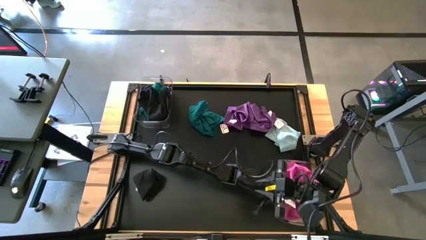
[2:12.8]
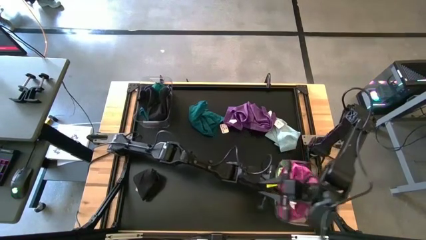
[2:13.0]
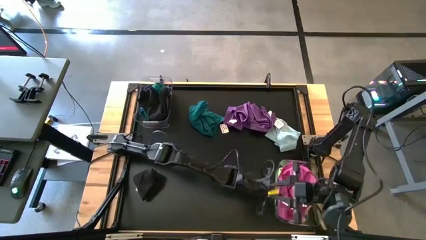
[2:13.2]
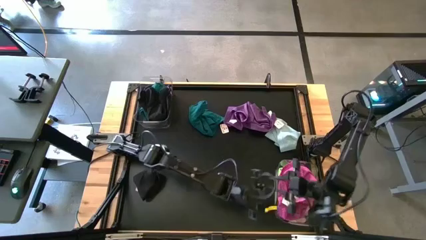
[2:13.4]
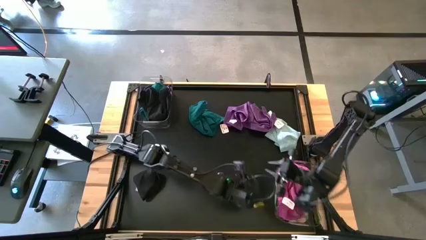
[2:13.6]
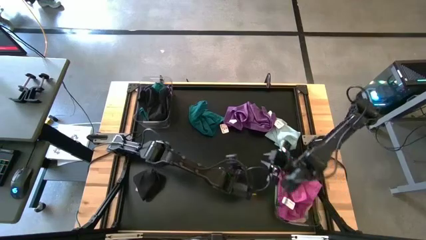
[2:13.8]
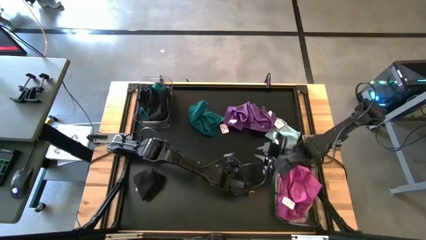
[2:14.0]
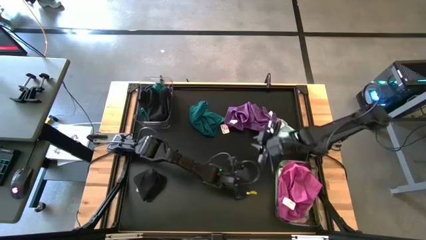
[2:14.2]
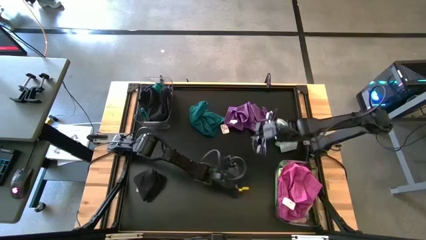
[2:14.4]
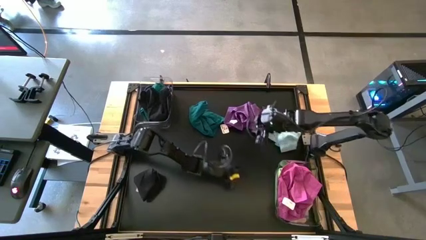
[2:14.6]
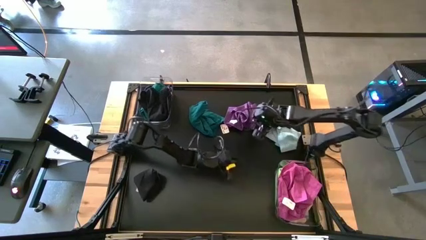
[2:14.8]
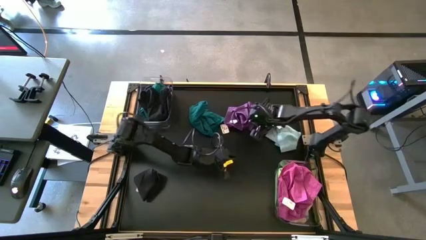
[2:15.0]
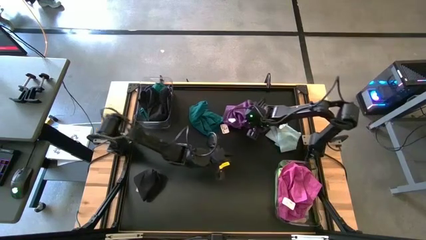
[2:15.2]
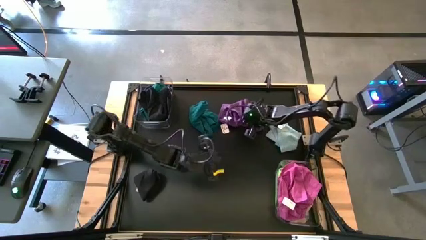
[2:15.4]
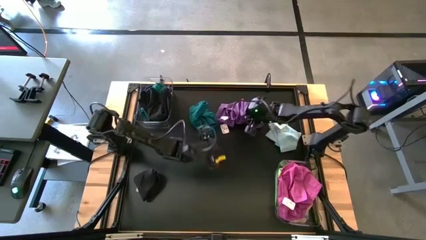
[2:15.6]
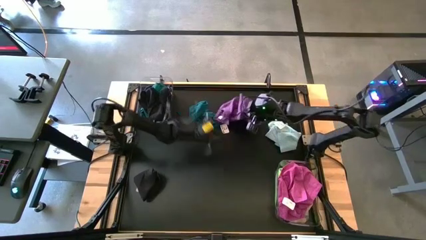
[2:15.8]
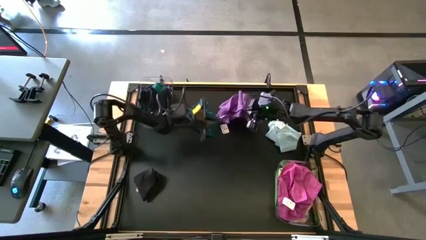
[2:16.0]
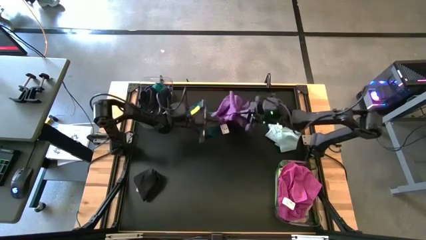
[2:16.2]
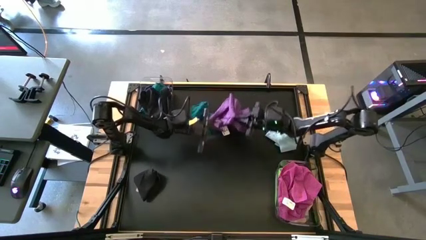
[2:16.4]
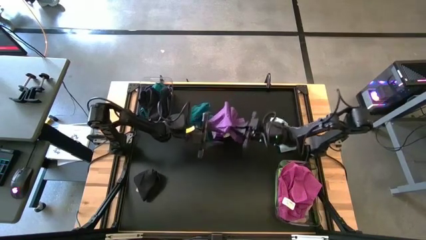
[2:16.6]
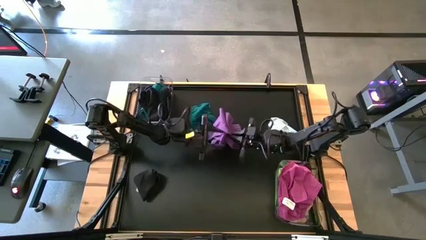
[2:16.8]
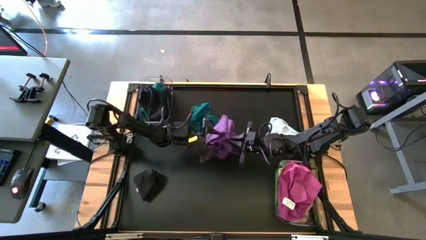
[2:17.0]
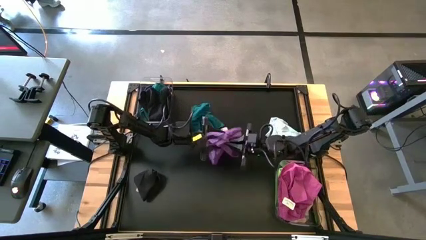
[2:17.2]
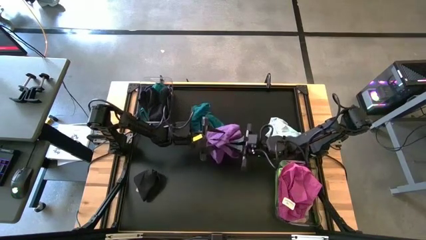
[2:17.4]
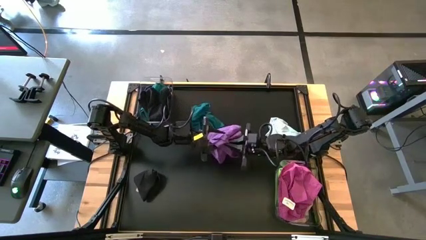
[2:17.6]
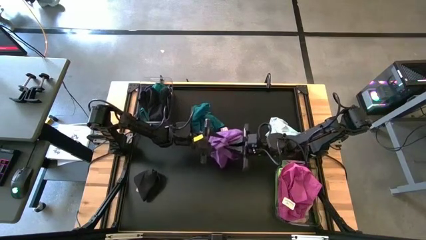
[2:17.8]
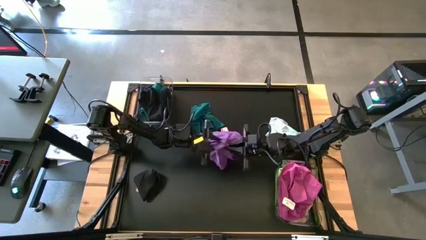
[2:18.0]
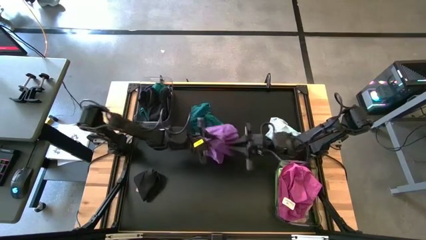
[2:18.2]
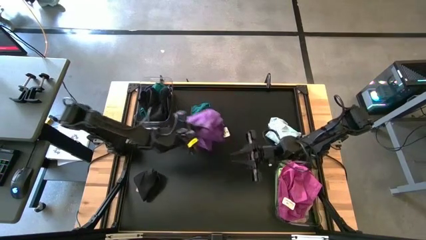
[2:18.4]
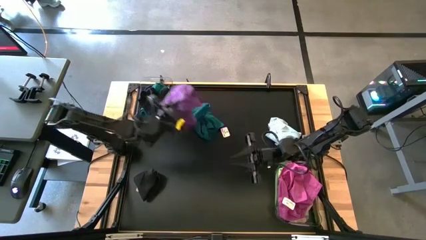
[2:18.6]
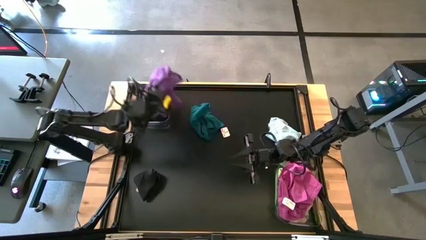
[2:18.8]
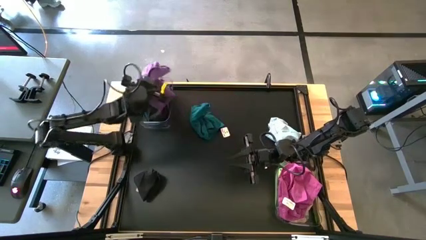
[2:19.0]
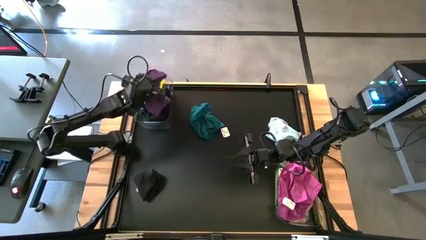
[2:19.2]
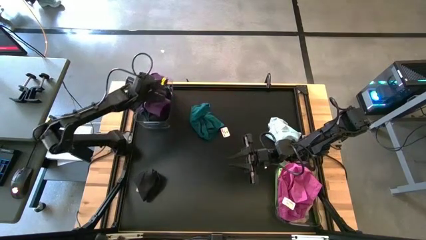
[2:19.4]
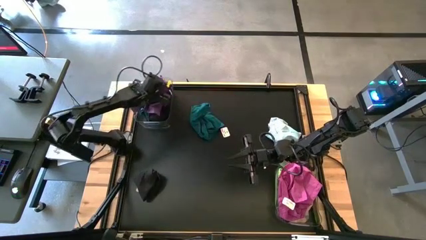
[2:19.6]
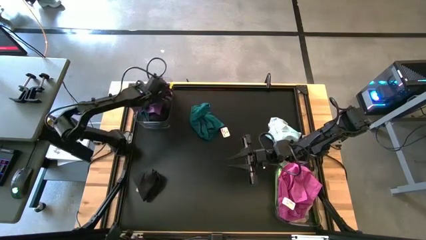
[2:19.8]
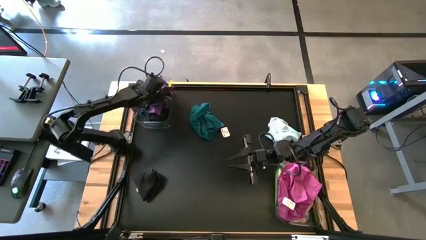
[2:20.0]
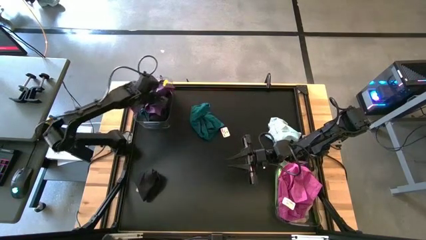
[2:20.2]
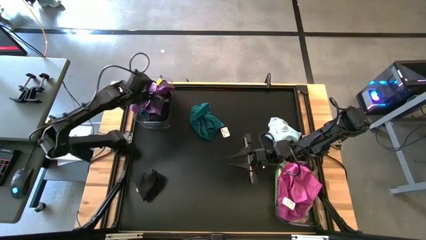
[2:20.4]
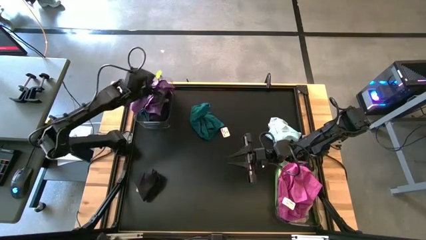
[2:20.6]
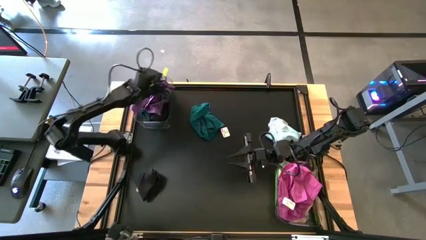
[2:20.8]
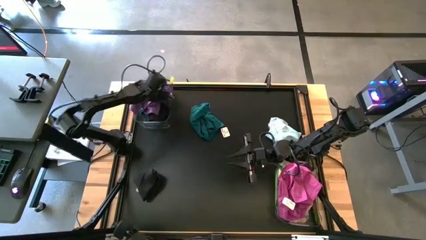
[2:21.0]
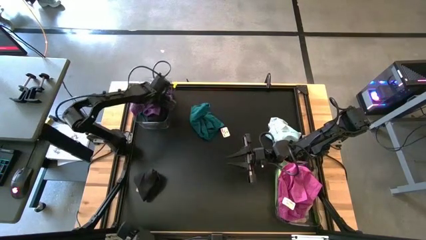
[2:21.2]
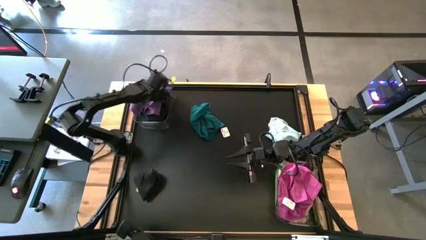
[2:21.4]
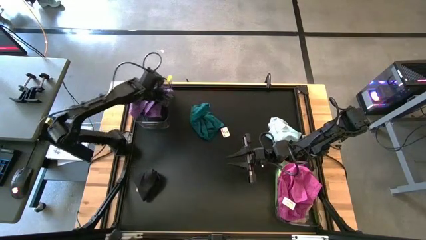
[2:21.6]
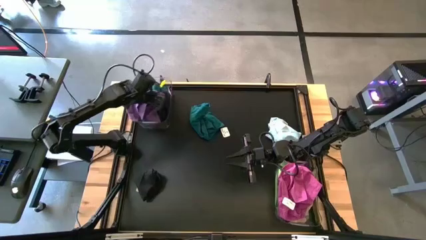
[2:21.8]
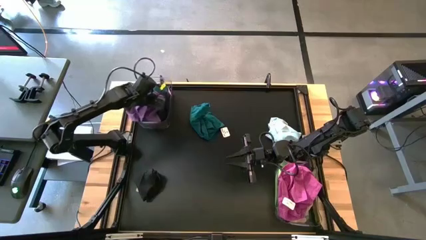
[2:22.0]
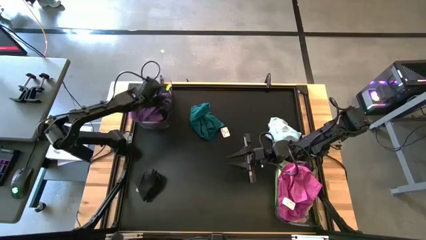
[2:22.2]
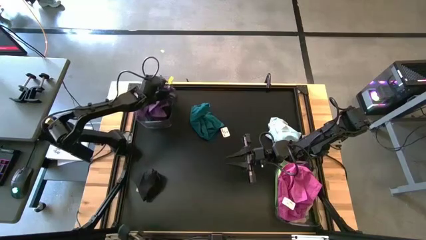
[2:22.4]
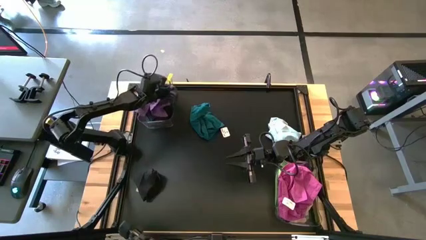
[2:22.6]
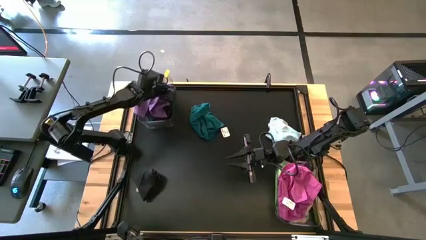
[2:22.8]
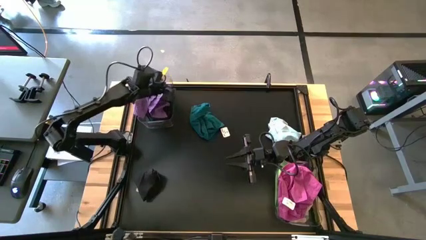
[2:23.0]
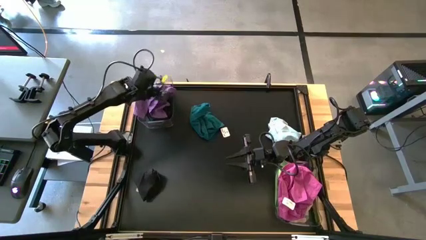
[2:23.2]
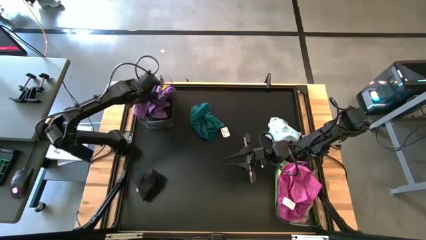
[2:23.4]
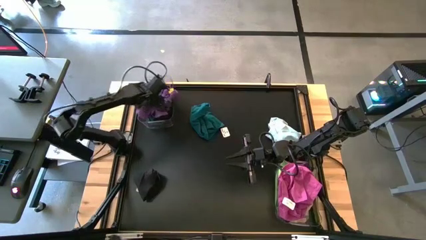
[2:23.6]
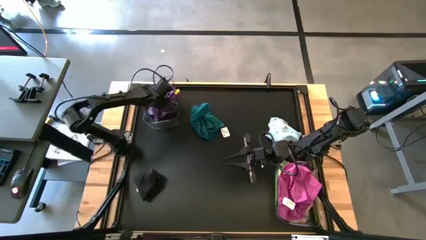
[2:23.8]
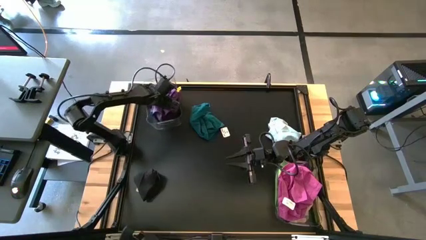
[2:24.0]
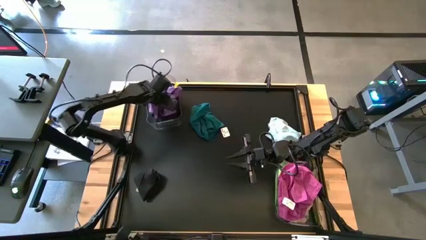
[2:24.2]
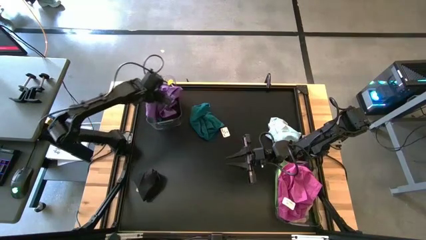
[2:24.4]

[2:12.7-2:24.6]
Task: Sort towels by color in basket
Put the purple towel into the top transparent bin

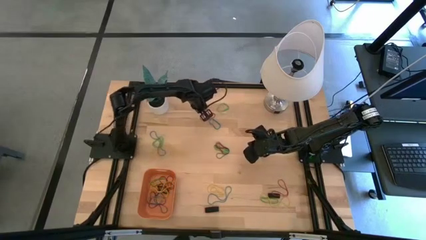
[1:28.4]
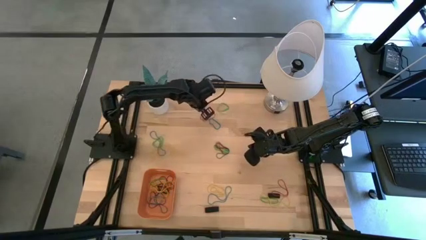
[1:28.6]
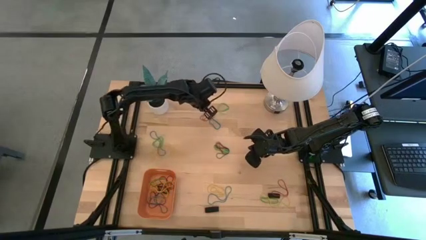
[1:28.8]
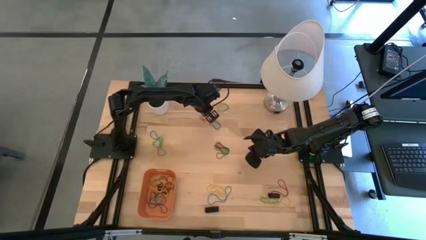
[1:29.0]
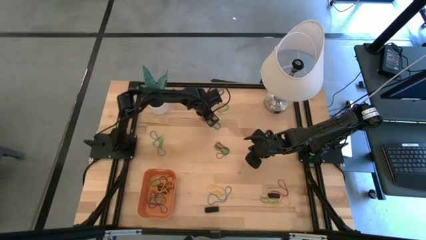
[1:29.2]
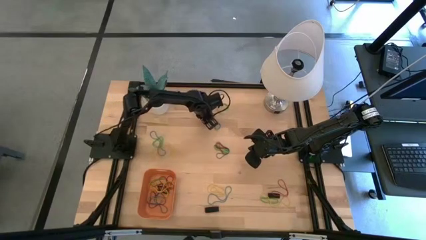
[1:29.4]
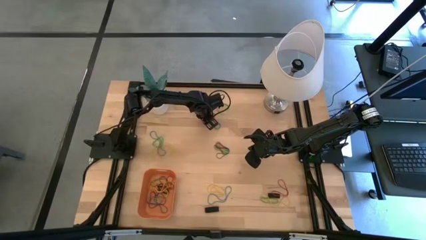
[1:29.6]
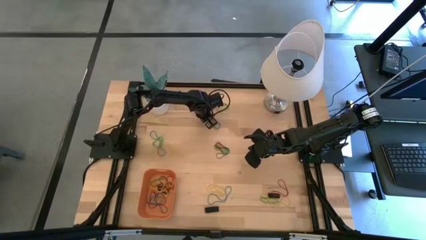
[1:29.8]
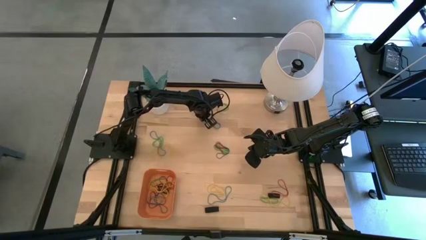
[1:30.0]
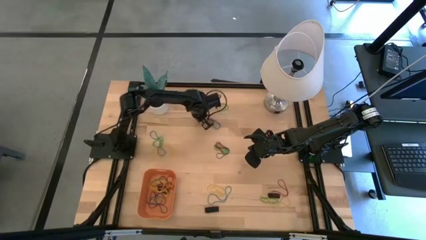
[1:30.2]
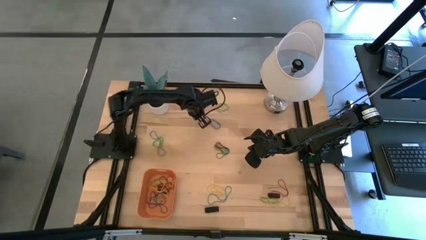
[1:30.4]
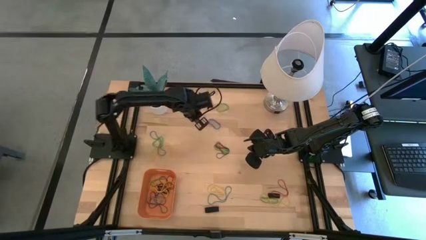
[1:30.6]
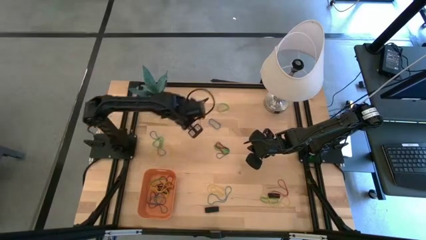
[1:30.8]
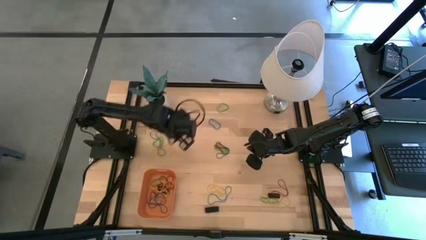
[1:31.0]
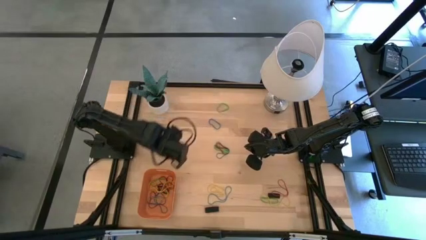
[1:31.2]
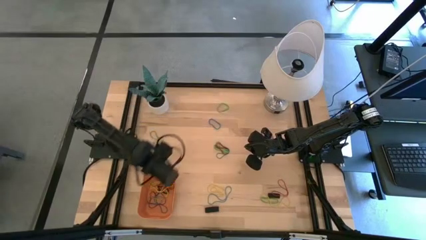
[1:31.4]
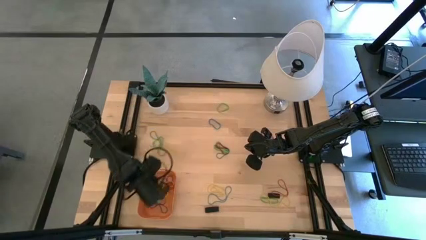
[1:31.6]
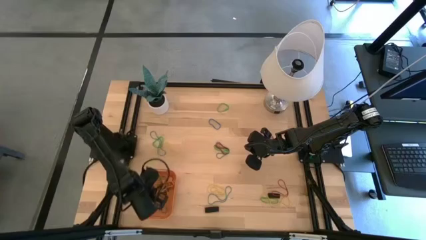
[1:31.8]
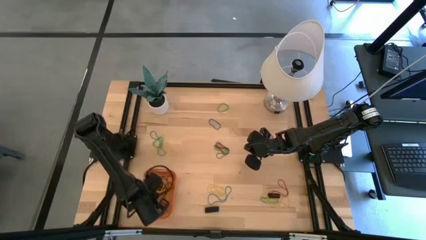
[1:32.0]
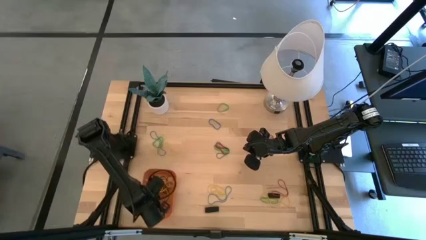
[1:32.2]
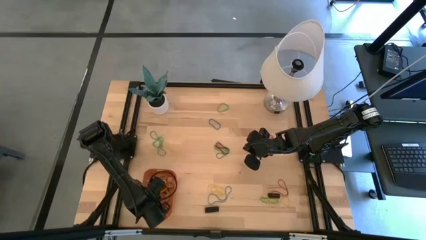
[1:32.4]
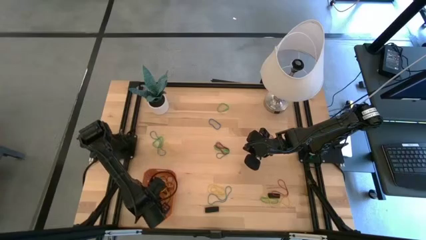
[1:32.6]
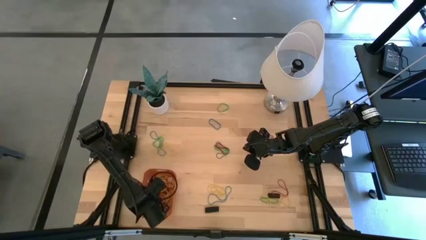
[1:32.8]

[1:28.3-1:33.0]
Task: Pick and place rubber bands into bin
Put the red rubber band into the orange bin
